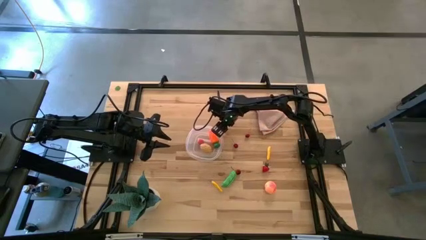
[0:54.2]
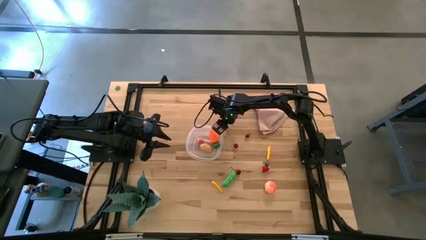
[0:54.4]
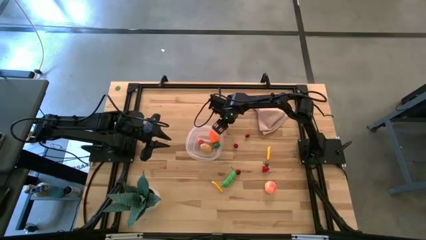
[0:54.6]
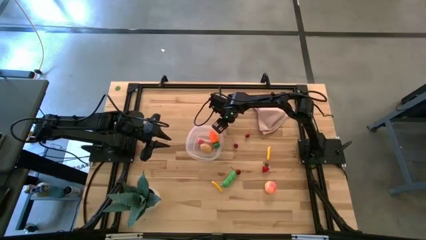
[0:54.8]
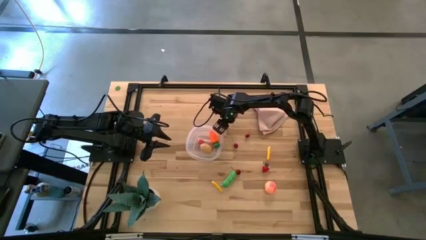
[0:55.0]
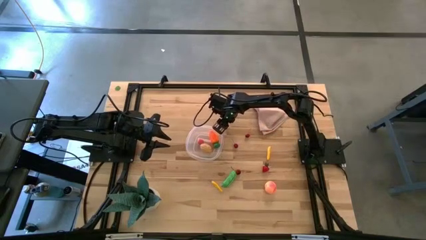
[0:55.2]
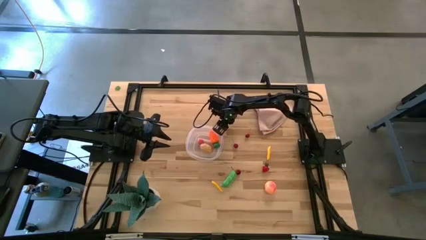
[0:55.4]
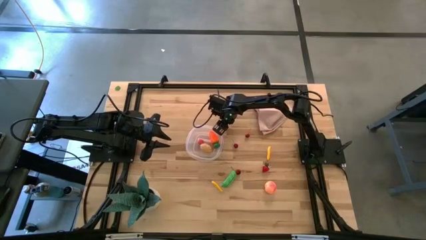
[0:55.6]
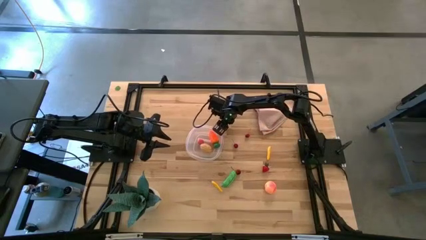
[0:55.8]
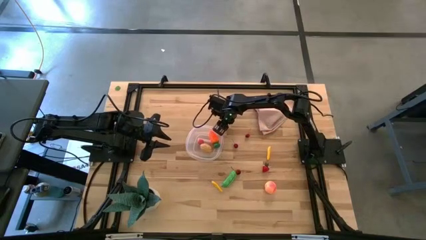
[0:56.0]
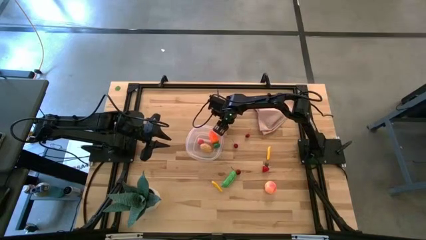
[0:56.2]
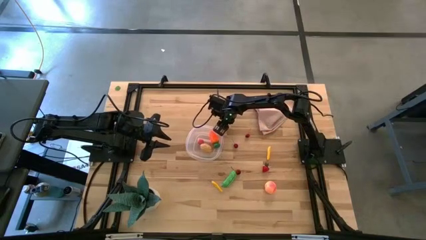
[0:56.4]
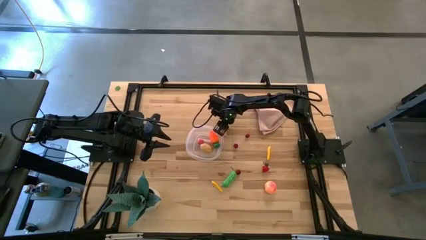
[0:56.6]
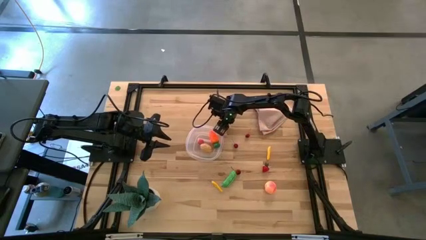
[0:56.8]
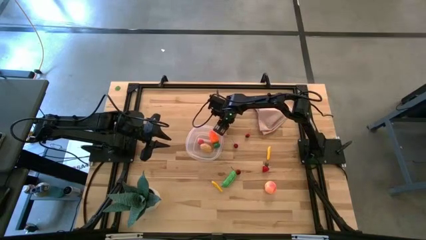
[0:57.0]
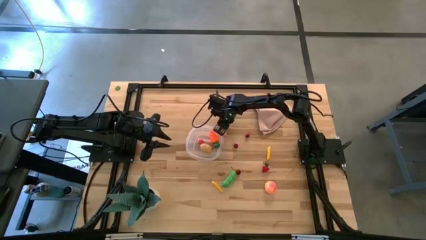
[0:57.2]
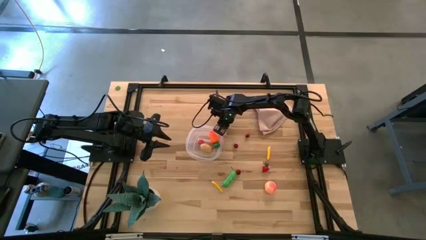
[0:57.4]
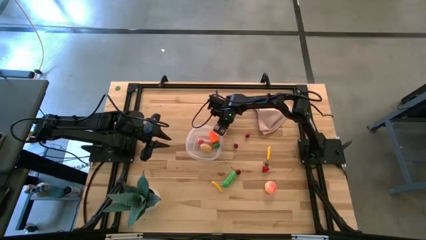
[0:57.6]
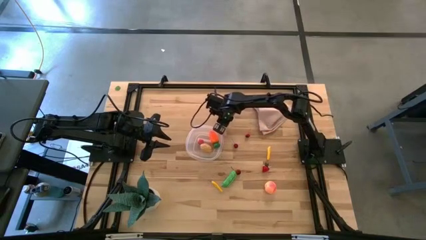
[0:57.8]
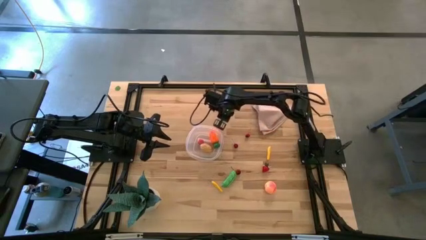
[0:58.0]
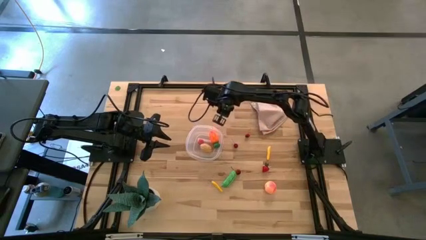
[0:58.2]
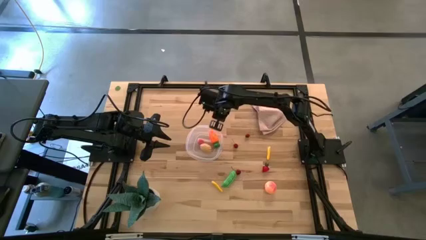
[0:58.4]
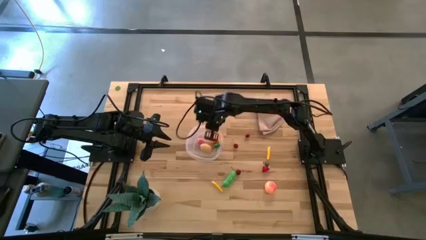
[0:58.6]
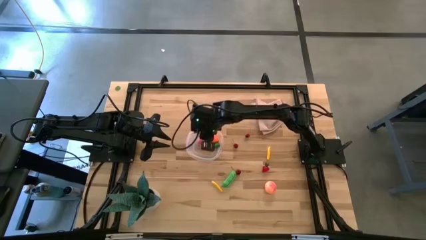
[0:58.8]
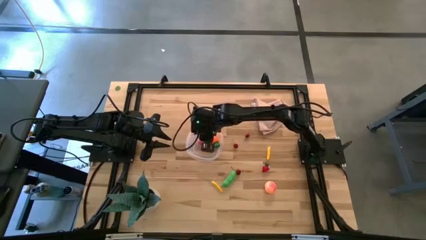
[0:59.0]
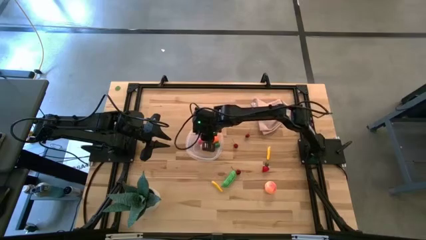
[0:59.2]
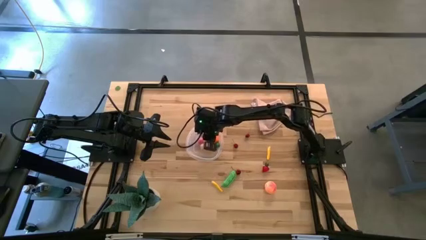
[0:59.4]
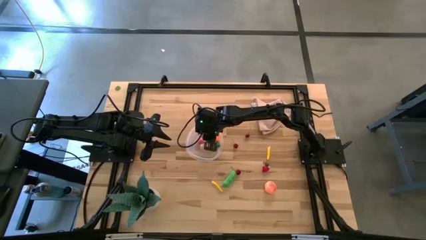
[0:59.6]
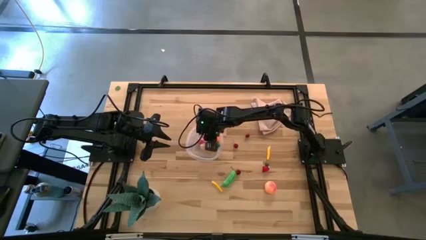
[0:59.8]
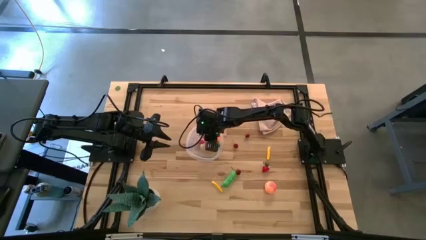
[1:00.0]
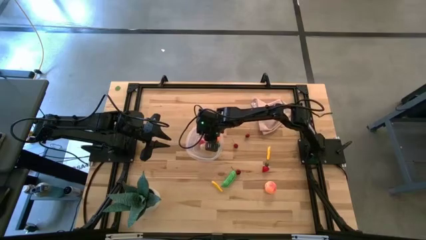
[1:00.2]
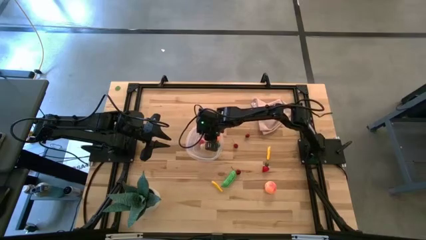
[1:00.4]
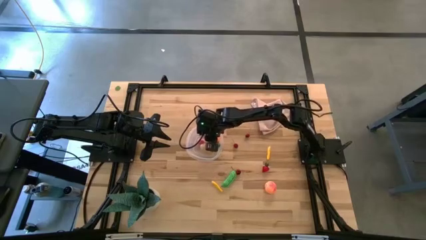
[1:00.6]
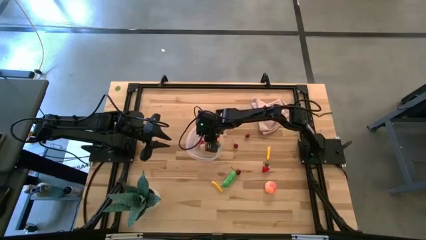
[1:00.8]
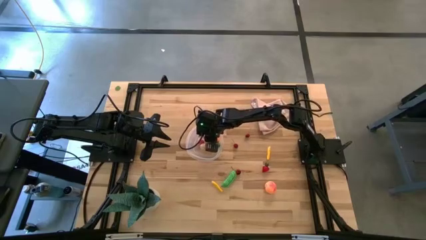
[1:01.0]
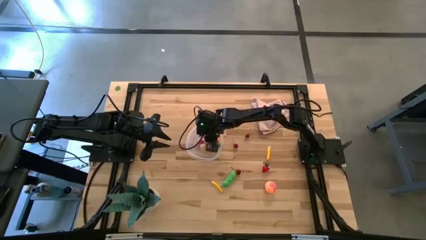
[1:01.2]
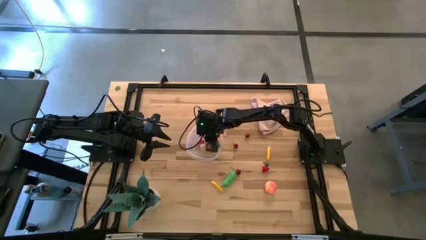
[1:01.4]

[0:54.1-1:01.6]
Task: Pick and placing Produce into tupperware
Put the cherry into the transparent bin

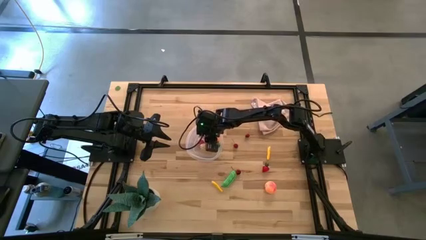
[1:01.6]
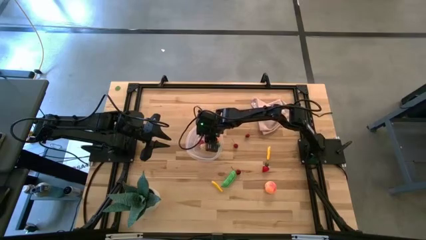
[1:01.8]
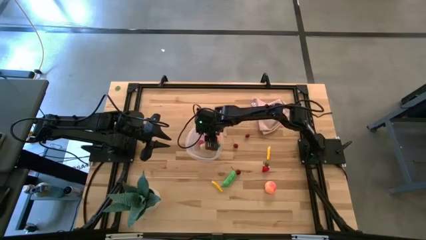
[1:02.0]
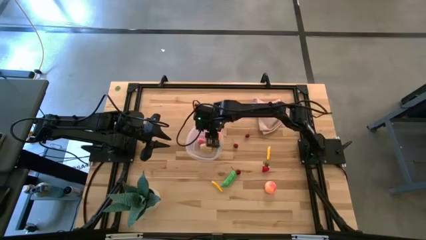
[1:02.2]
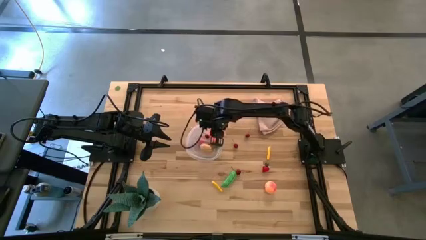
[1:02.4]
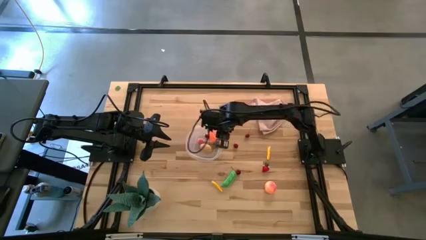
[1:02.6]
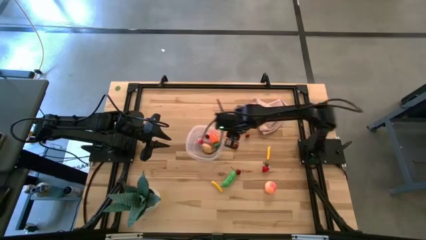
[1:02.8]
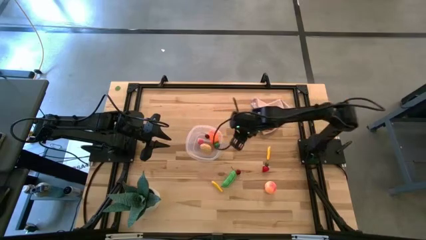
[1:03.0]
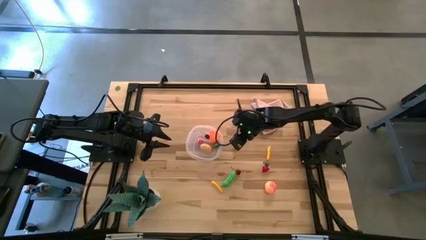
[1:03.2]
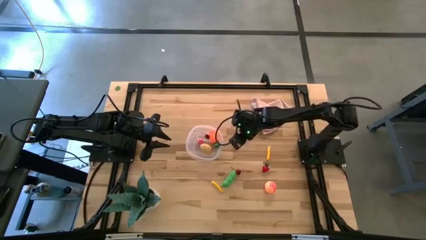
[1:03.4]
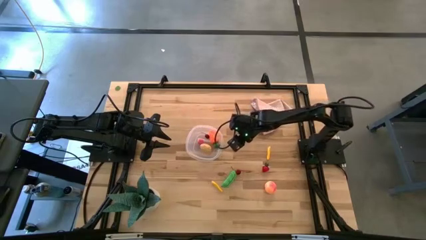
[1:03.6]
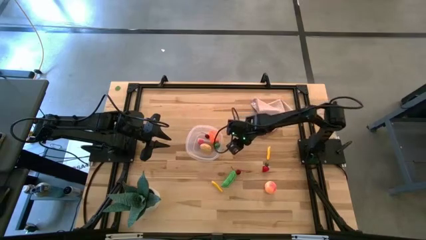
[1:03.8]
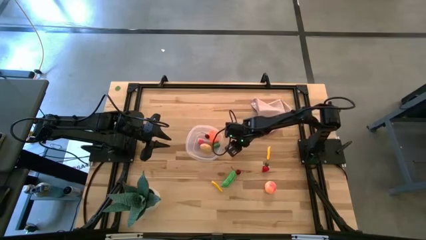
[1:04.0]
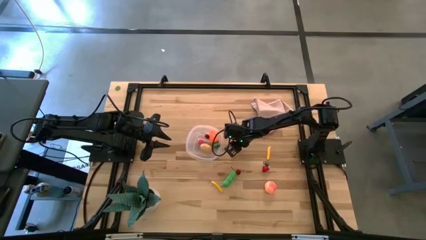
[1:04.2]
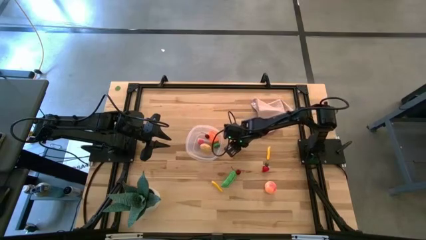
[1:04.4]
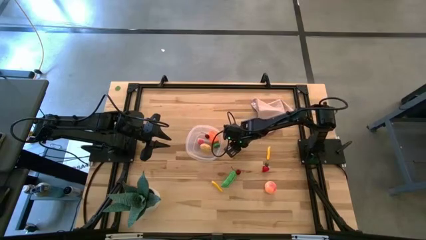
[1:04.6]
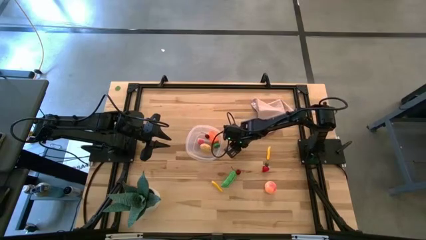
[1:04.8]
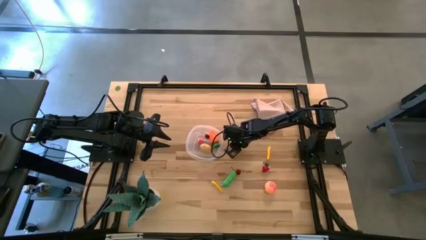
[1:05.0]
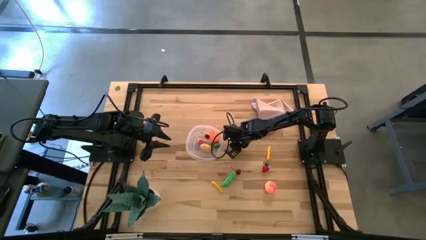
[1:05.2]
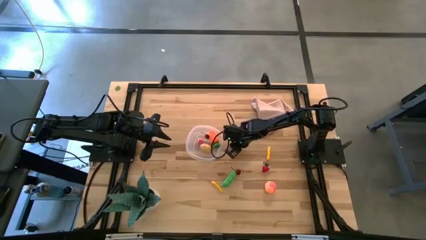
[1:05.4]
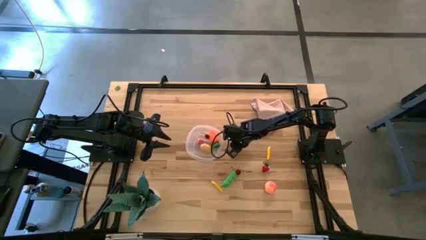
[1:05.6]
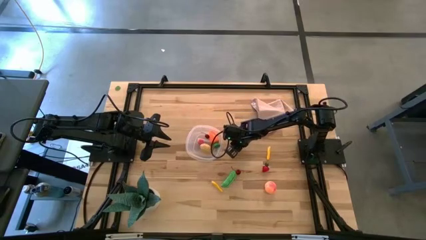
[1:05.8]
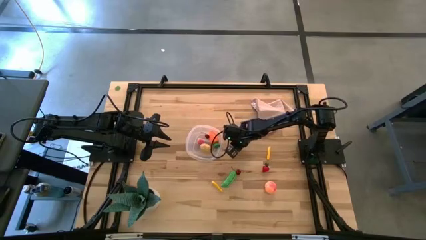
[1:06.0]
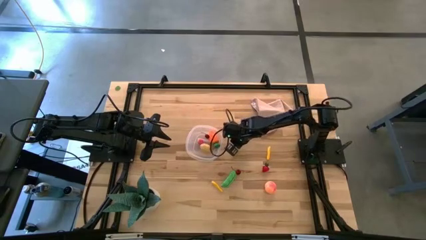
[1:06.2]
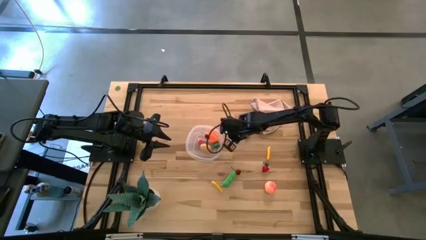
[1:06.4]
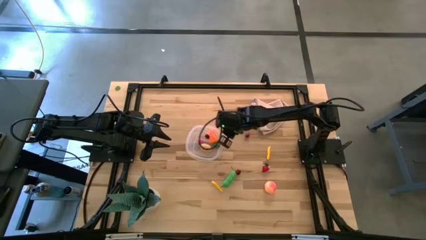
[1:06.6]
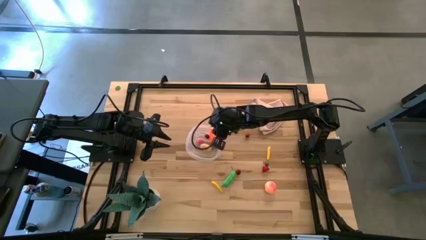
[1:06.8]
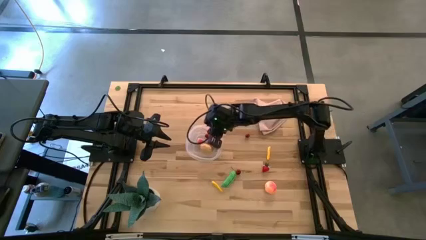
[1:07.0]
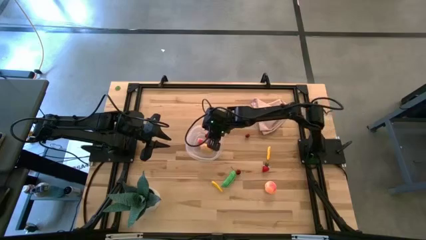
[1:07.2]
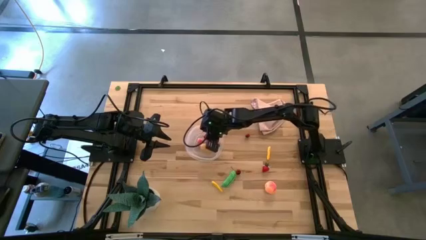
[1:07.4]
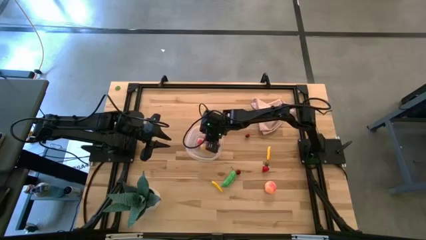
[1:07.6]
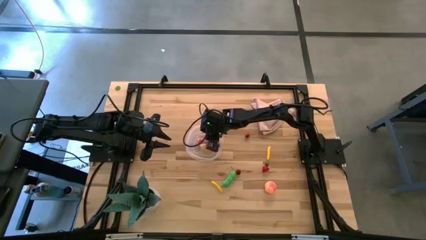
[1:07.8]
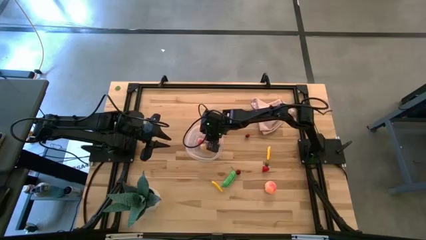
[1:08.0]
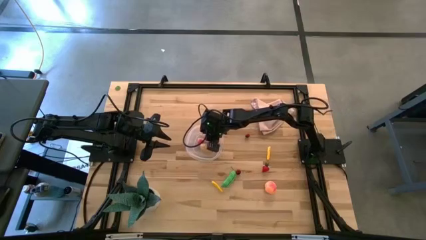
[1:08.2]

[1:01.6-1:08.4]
Put the middle cherry into the transparent bin

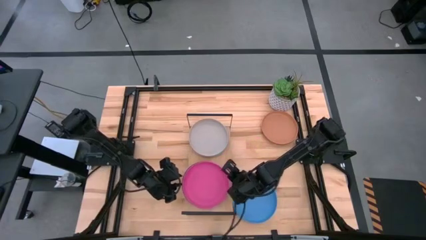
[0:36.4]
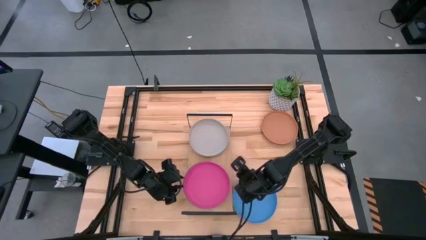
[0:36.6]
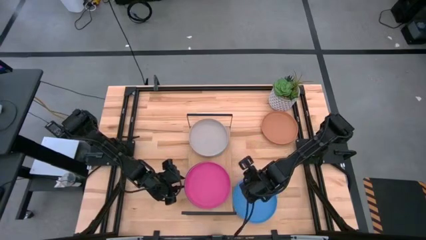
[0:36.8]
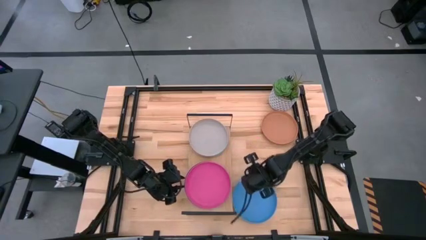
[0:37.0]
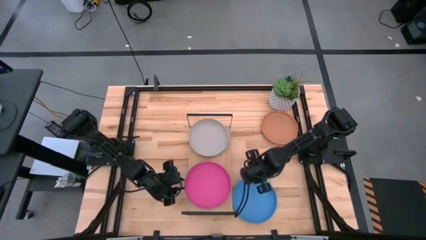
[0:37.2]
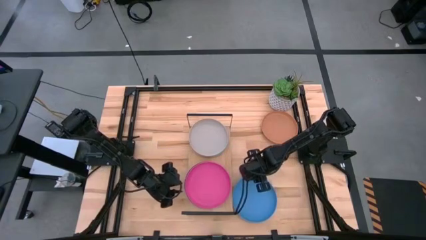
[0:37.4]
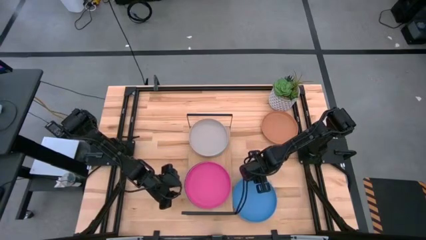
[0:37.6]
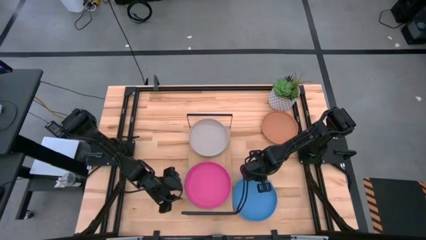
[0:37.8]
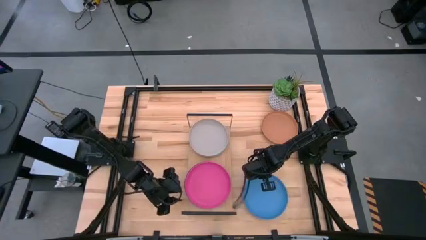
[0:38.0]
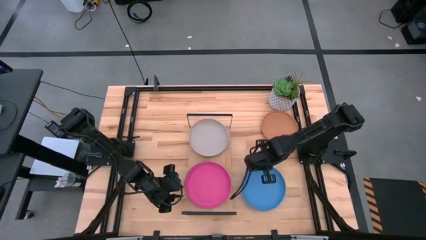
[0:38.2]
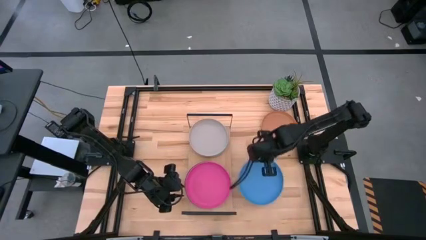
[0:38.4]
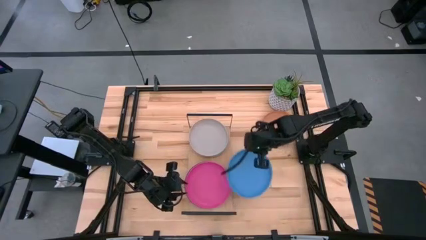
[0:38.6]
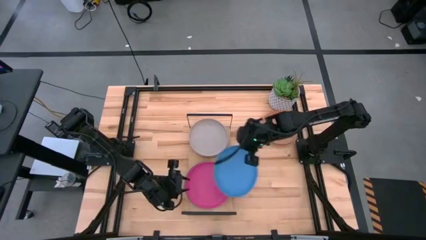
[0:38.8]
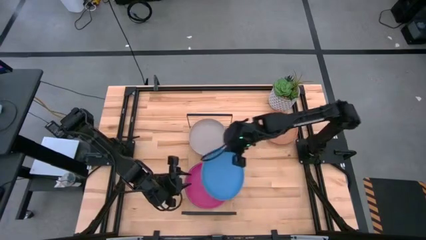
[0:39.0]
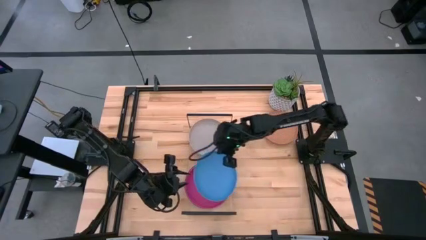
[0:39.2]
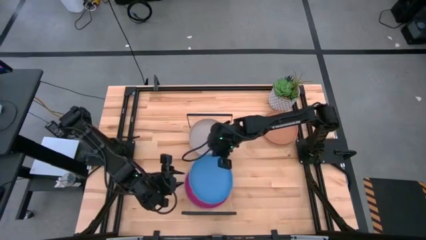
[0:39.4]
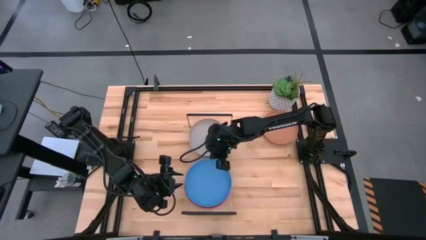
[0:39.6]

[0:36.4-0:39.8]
Task: Place and stack plates onto a shelf
Stack the blue plate on top of the pink plate on the shelf
